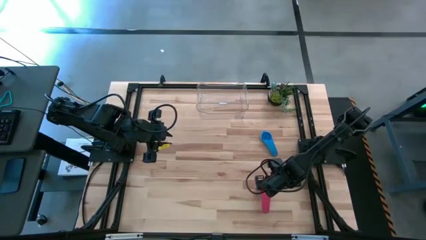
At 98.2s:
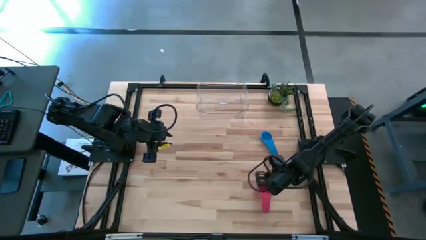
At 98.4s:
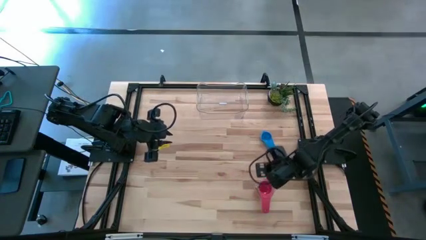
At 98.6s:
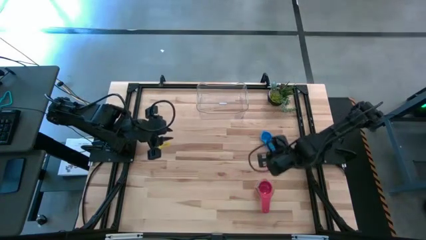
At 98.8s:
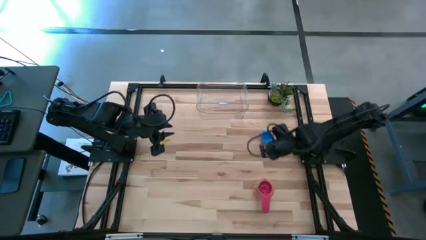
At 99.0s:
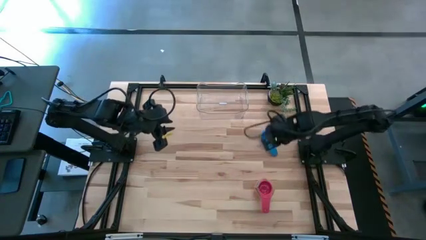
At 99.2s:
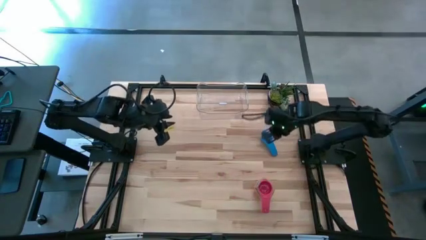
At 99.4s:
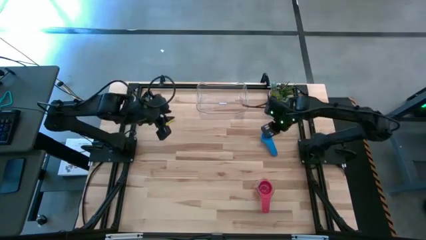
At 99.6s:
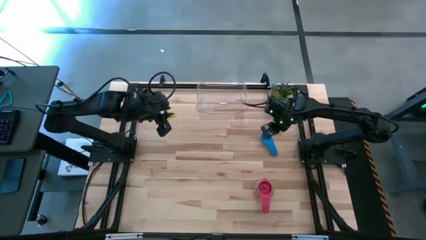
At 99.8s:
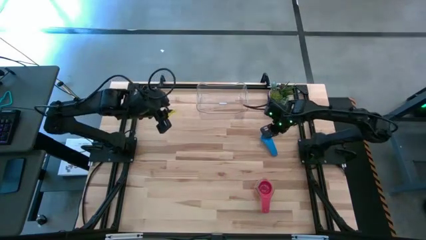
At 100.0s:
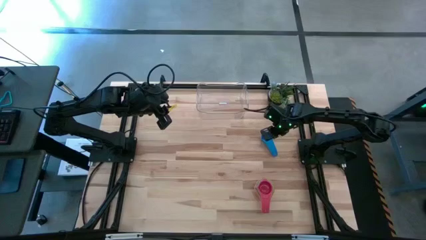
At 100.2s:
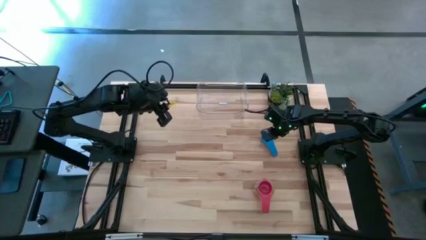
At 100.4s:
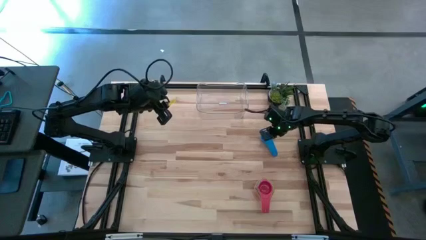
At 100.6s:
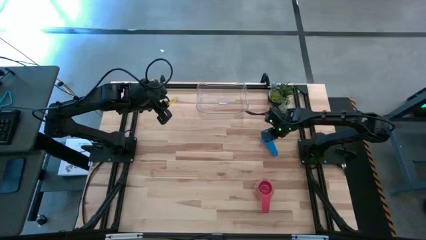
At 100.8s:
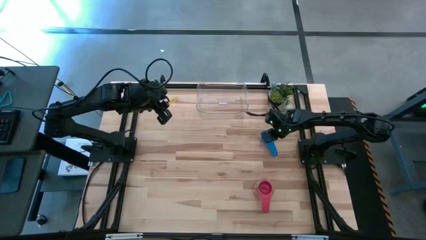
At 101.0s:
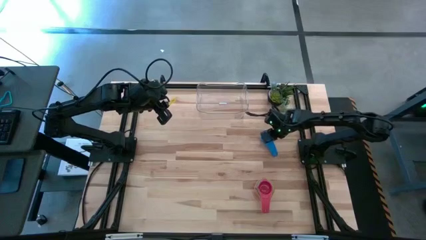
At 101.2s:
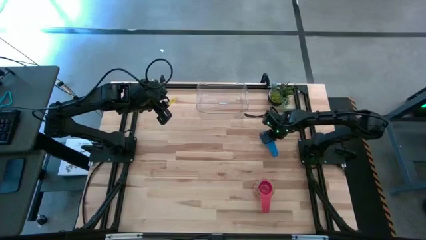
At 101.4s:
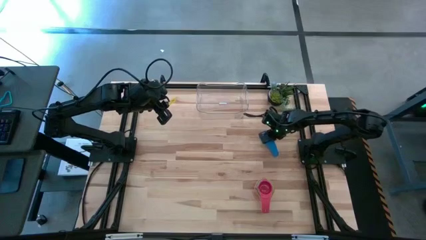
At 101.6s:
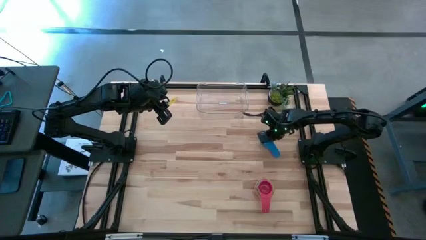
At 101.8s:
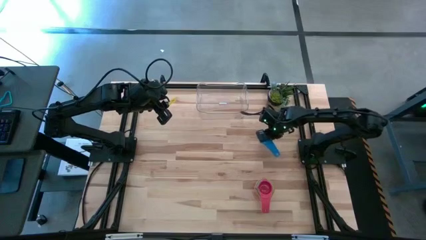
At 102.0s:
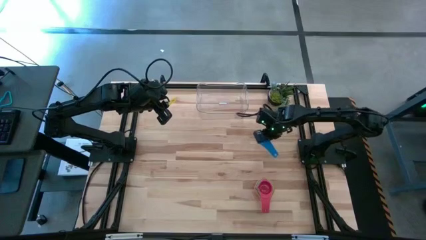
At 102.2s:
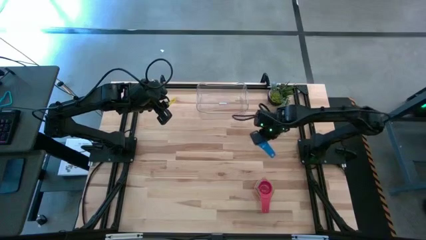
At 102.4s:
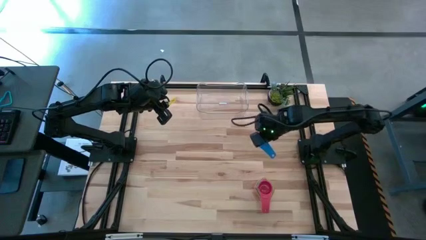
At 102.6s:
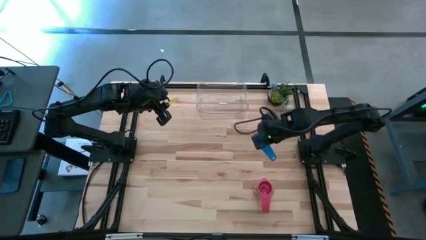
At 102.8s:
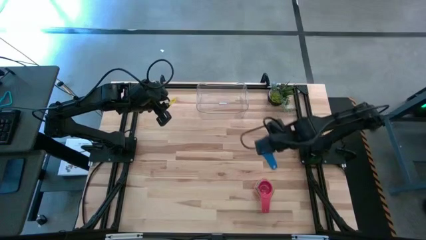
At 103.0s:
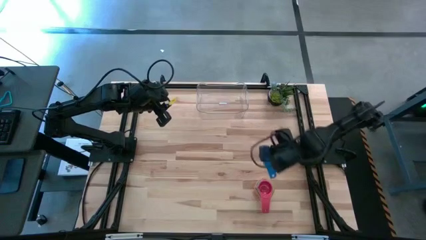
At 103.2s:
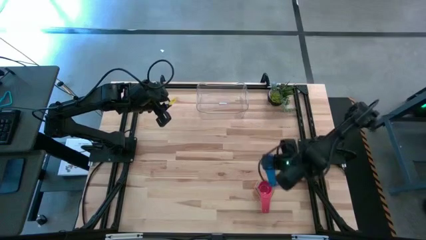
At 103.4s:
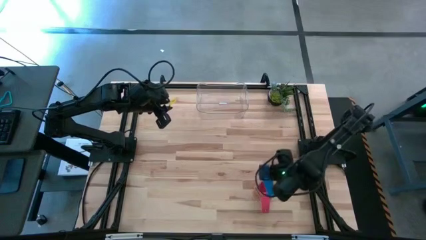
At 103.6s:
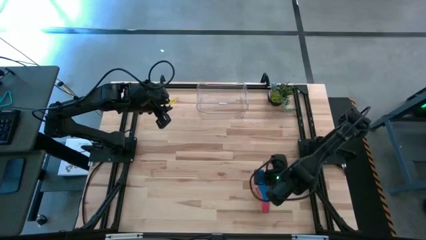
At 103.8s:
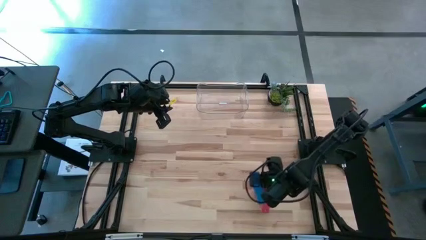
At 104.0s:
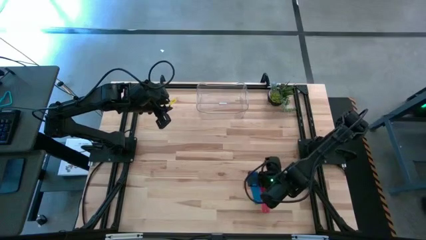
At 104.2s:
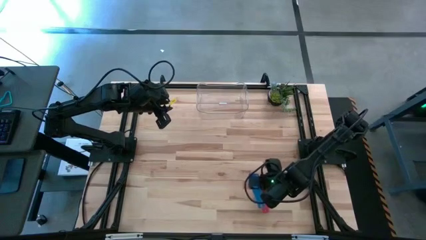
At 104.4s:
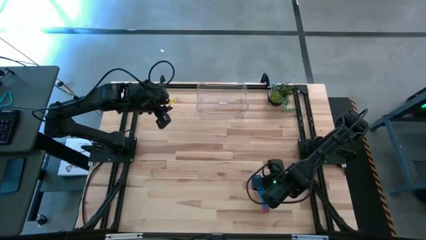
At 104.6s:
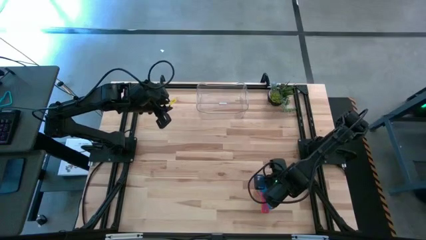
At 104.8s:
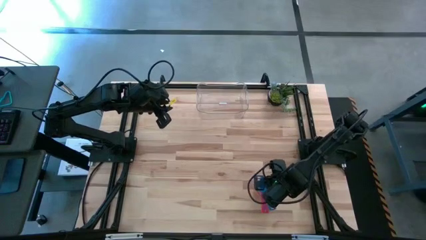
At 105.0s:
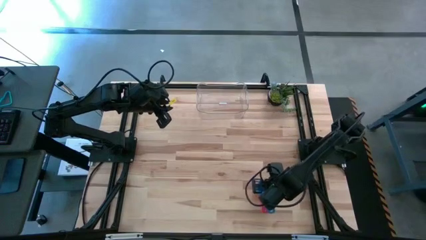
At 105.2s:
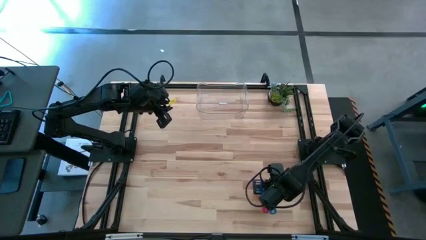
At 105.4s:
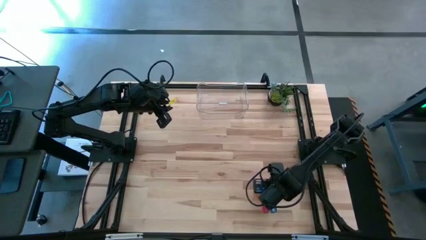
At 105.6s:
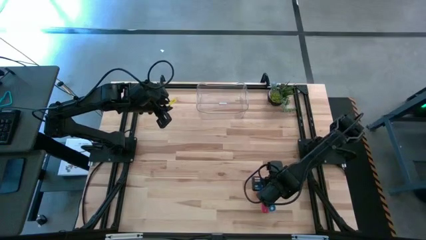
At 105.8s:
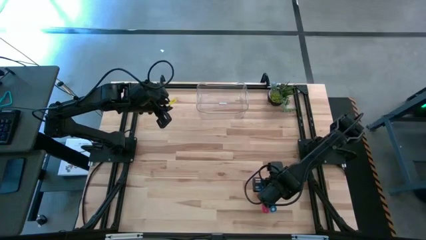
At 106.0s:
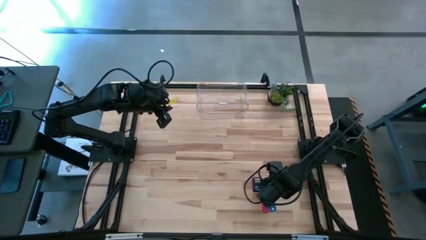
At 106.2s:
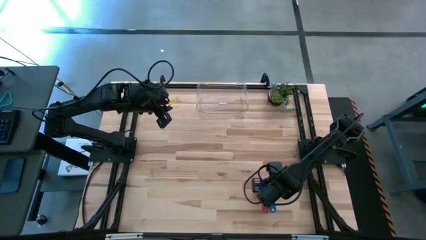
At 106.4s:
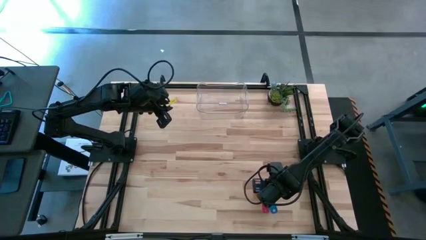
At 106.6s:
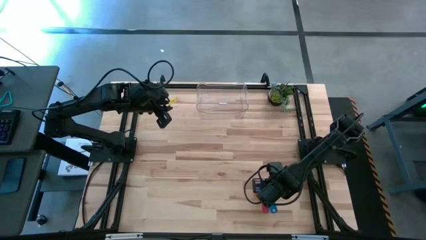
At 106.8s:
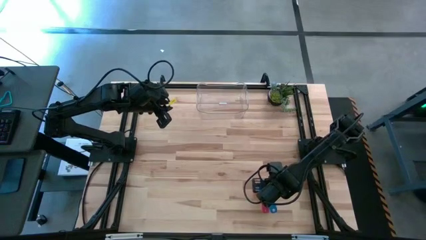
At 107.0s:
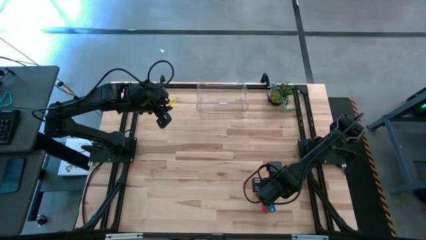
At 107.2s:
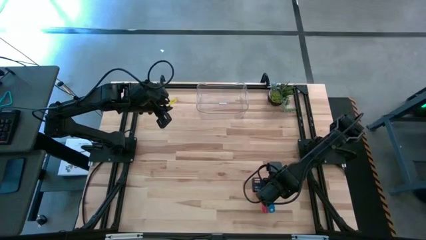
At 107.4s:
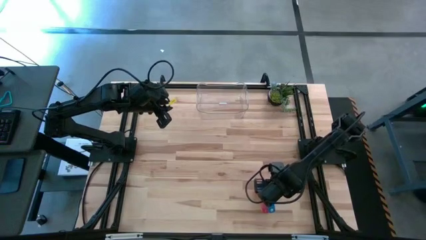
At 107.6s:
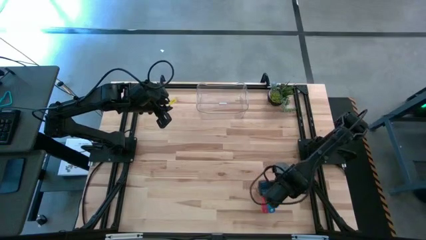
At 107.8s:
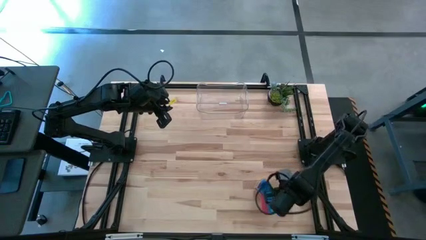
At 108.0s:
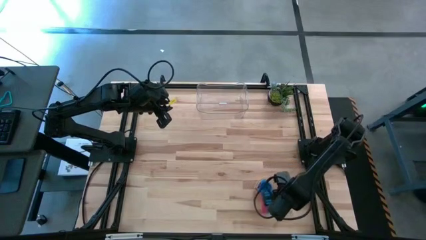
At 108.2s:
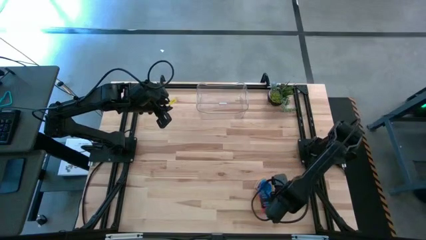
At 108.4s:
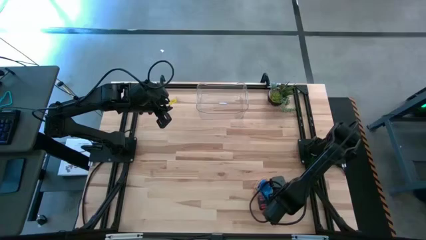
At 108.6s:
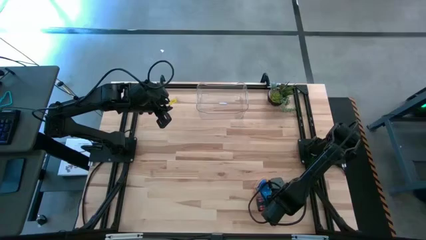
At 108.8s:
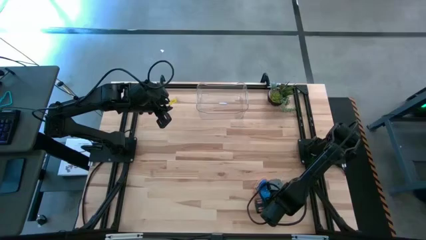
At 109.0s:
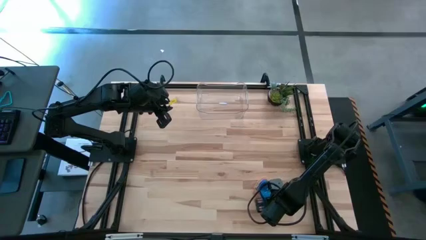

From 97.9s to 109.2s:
Task: Nest measuring cups in basket
Stack the blue measuring cup on top of the other red measuring cup

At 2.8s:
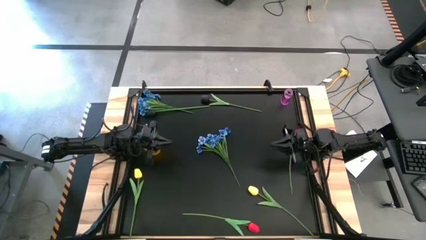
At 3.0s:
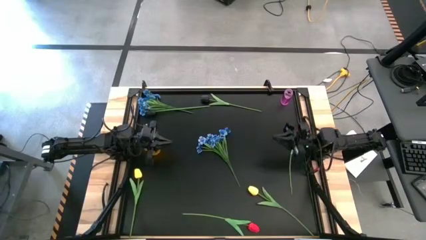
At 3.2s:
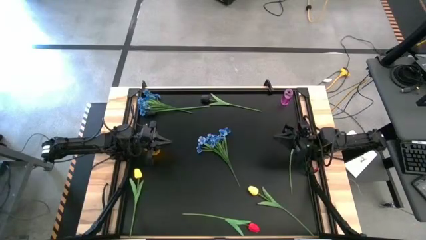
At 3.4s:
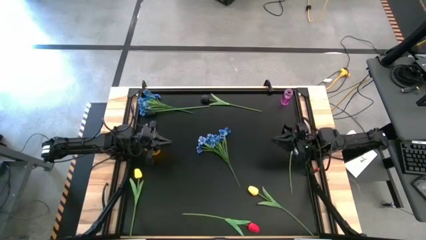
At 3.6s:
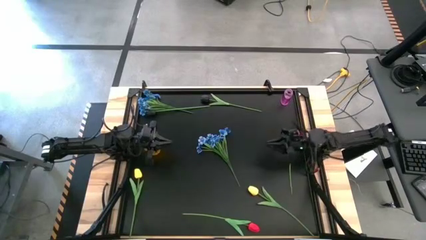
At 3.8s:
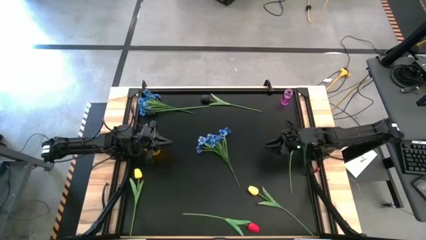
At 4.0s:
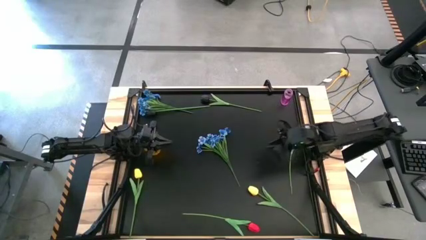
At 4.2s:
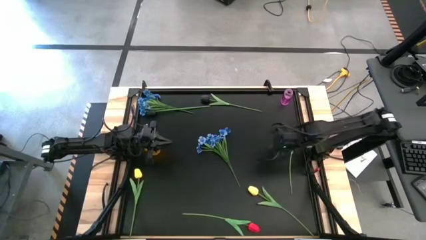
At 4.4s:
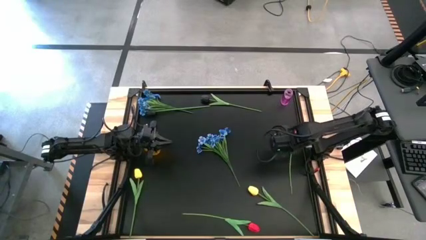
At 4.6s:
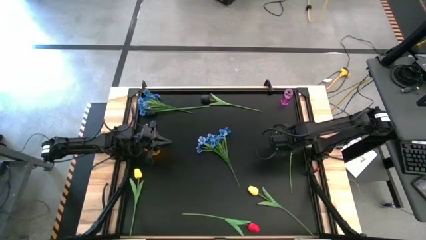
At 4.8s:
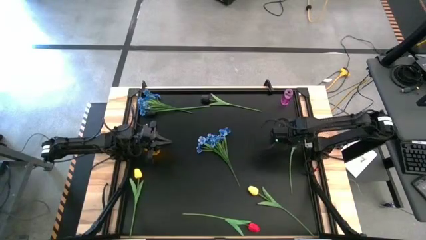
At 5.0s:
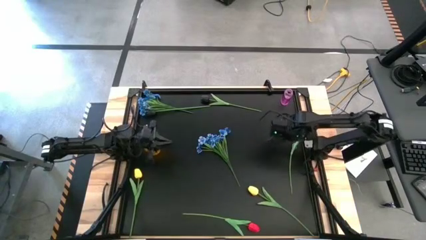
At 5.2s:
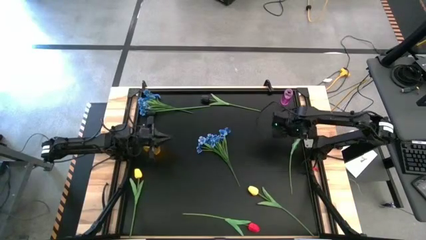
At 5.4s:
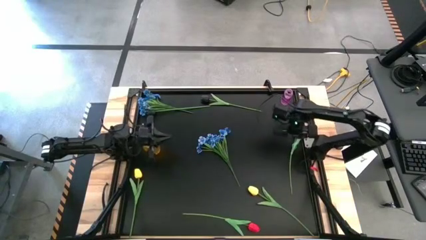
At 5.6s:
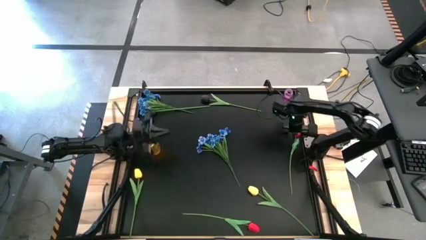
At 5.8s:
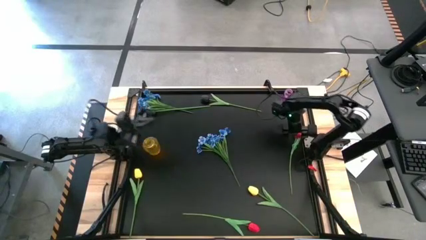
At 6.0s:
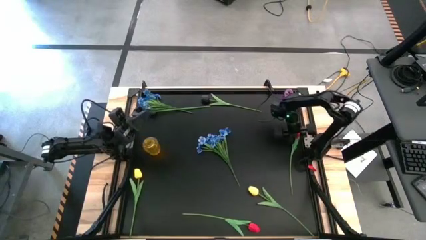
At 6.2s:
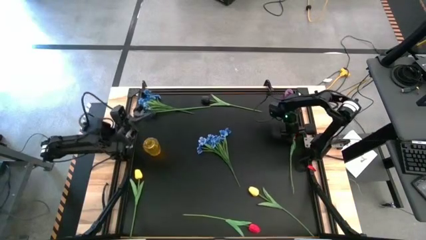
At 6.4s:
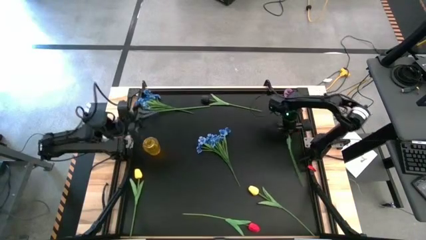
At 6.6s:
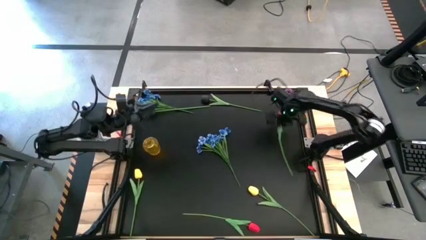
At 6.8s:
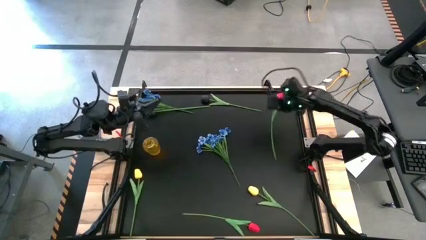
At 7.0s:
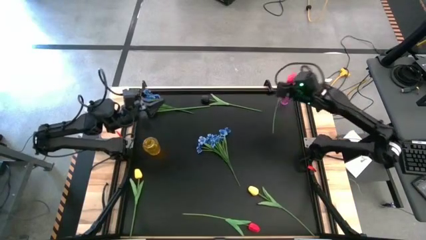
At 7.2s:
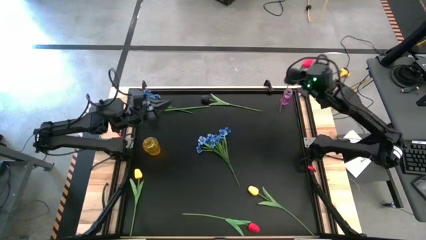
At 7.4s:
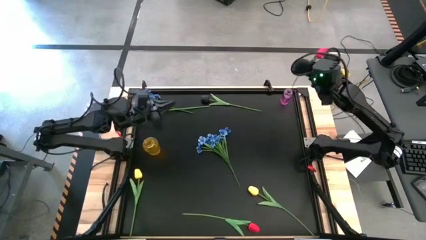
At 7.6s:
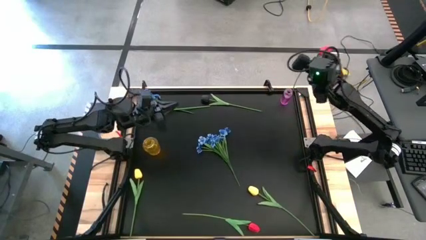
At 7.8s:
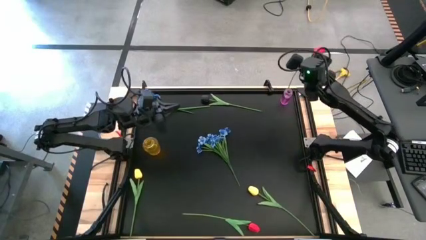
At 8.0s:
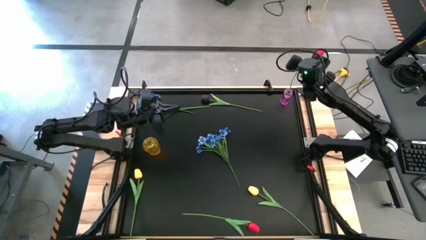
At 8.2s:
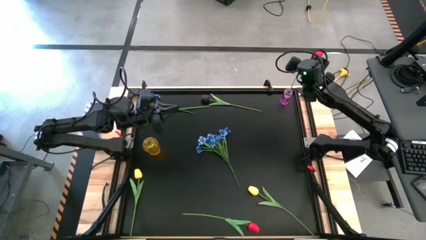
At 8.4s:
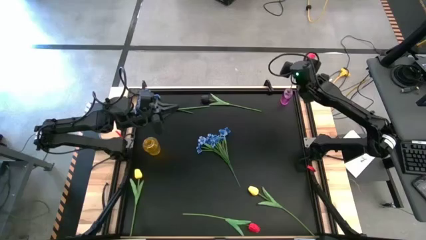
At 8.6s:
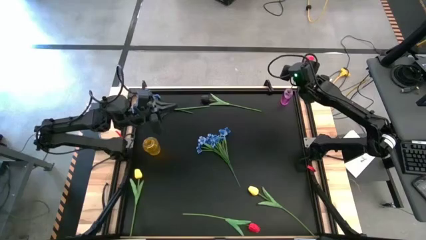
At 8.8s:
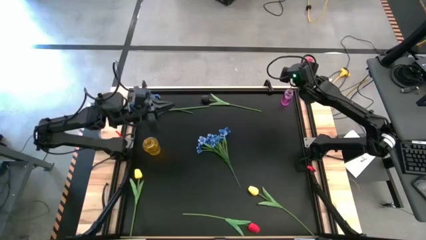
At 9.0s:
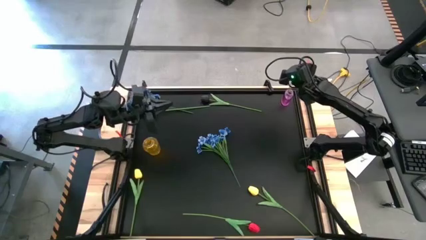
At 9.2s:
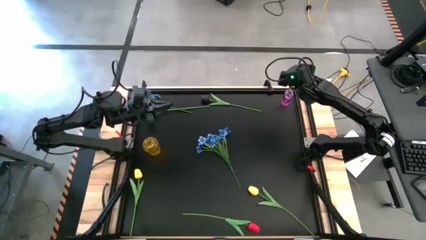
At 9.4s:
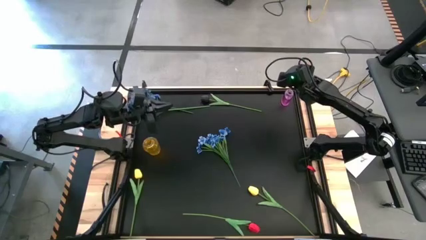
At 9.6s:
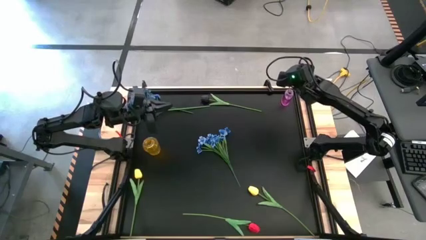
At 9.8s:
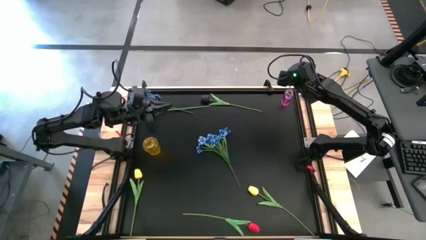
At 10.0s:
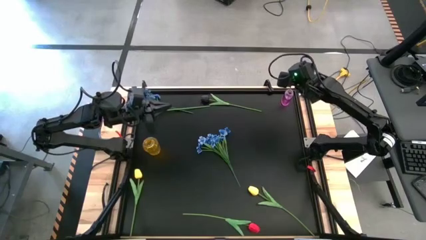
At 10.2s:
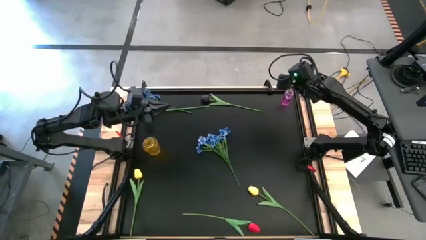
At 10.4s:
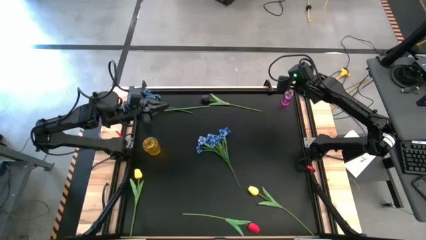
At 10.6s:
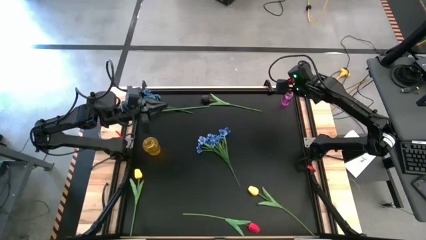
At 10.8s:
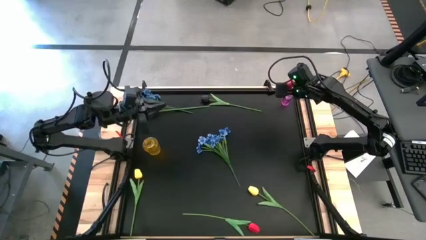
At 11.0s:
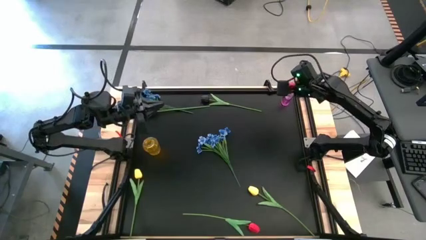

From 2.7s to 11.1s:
Task: Sort flowers into vase by color
Put the top red flower into the purple vase
